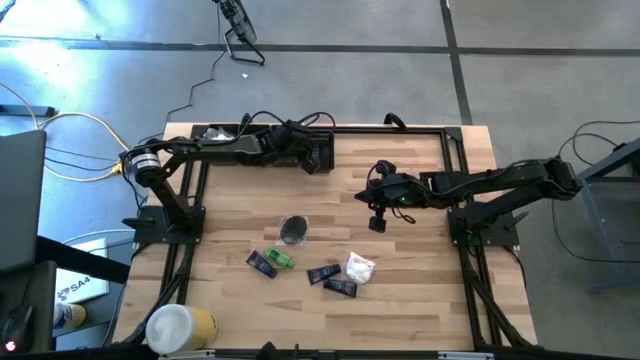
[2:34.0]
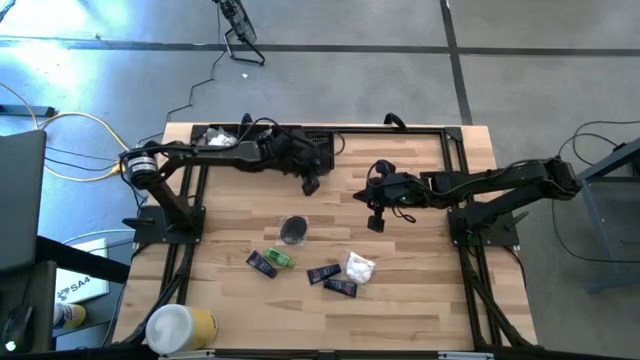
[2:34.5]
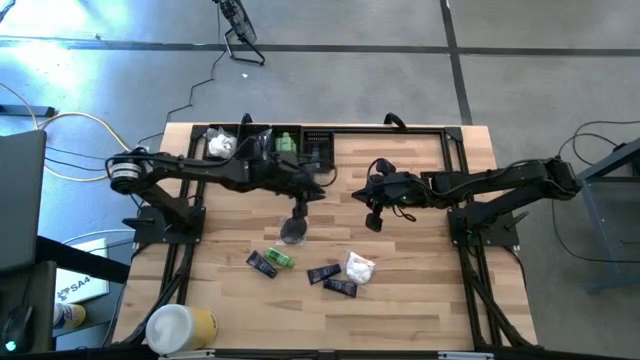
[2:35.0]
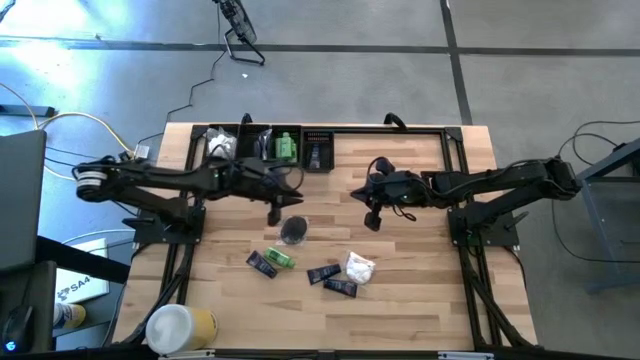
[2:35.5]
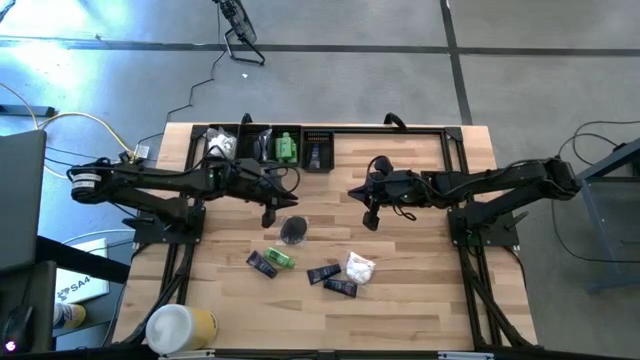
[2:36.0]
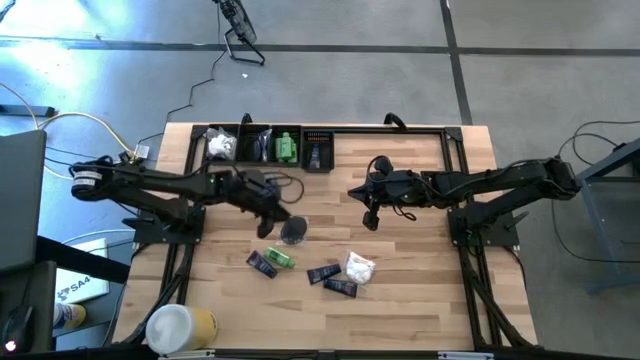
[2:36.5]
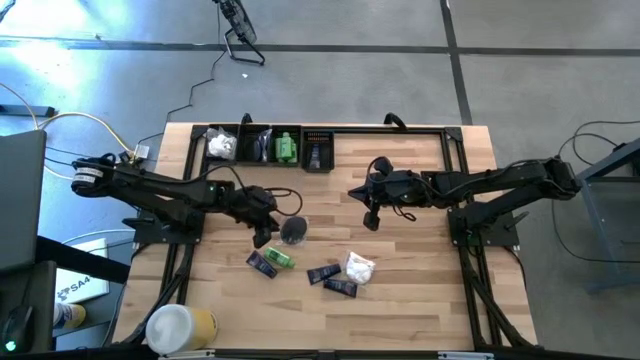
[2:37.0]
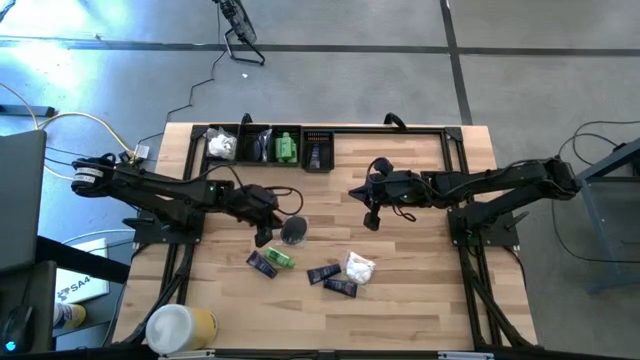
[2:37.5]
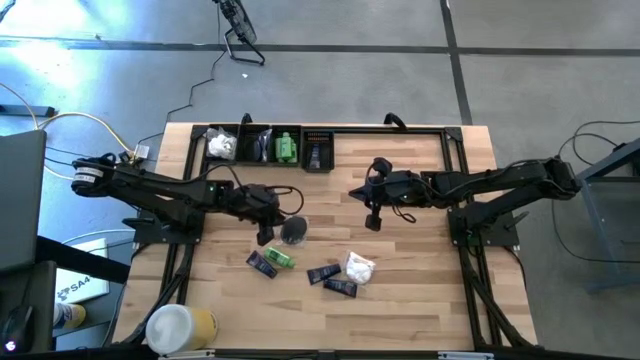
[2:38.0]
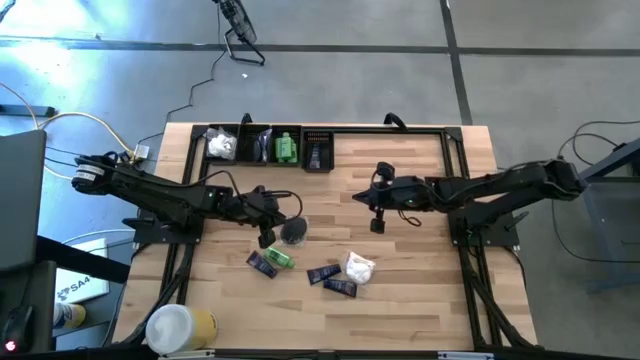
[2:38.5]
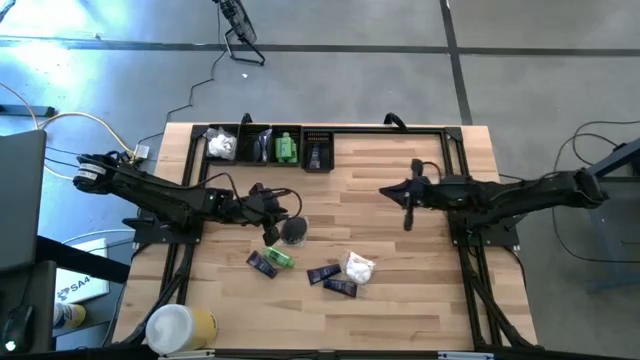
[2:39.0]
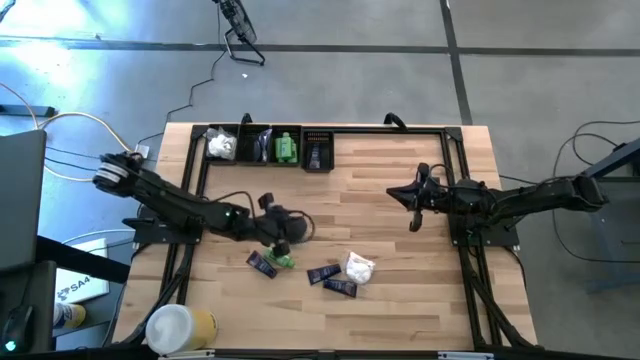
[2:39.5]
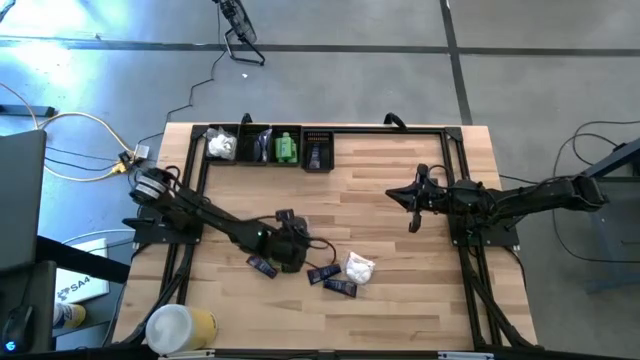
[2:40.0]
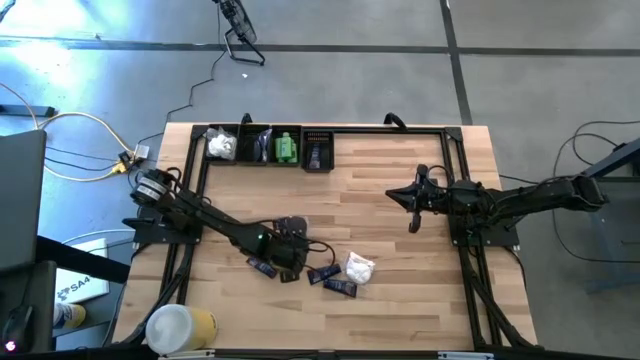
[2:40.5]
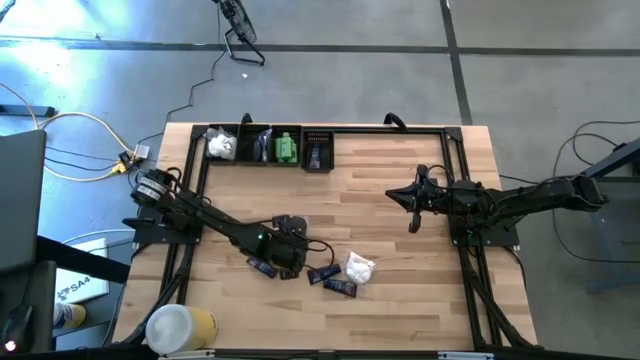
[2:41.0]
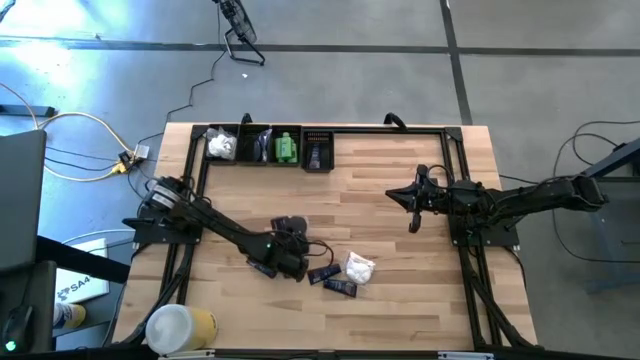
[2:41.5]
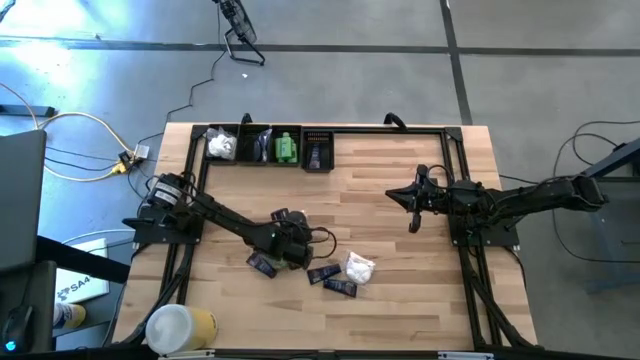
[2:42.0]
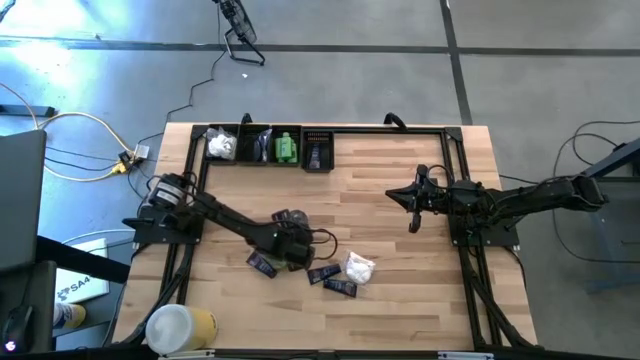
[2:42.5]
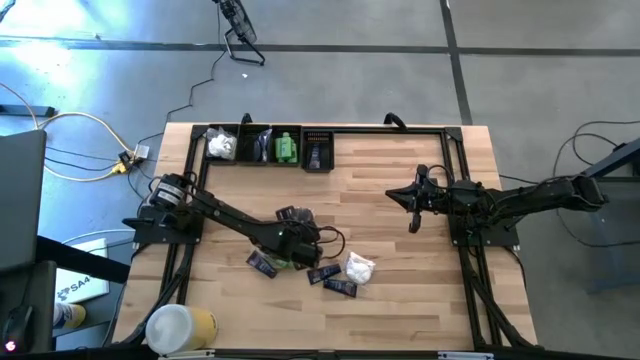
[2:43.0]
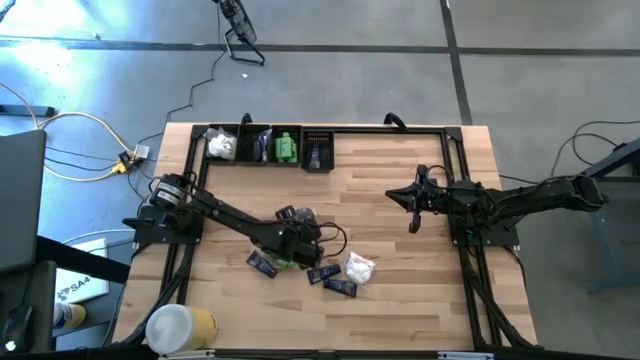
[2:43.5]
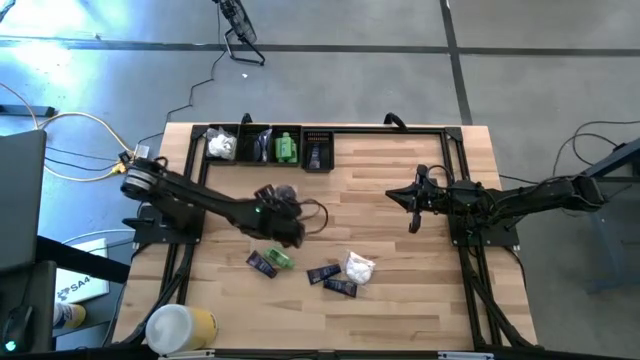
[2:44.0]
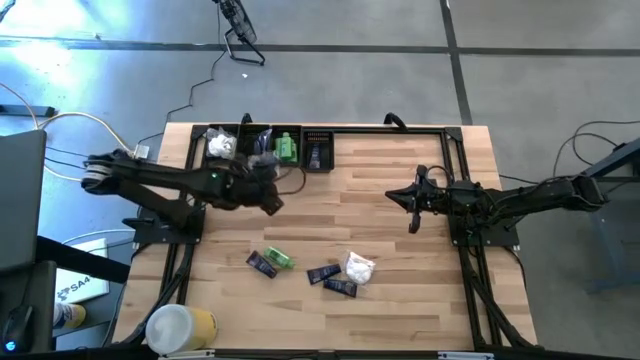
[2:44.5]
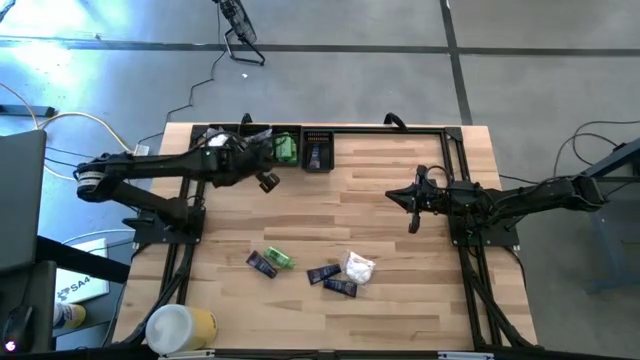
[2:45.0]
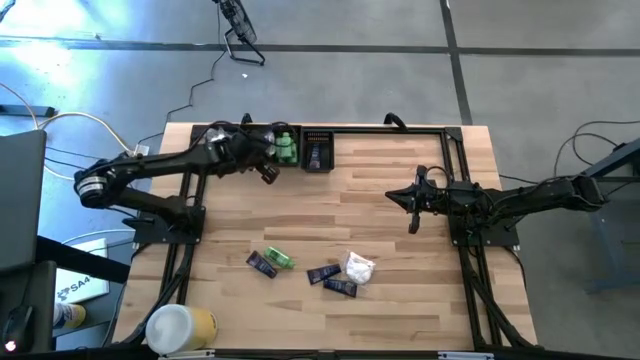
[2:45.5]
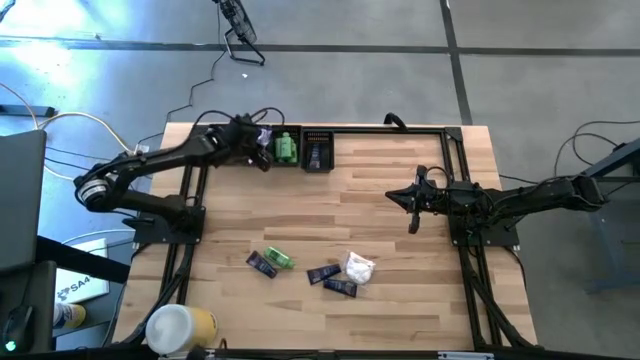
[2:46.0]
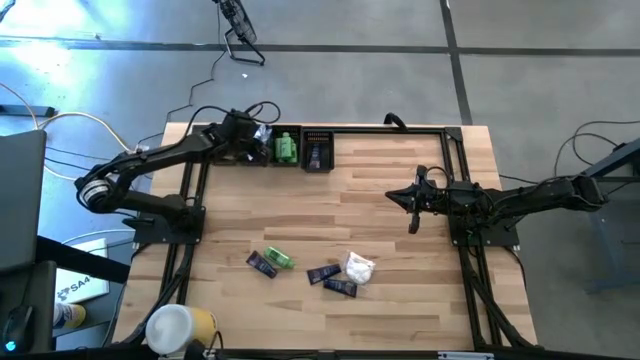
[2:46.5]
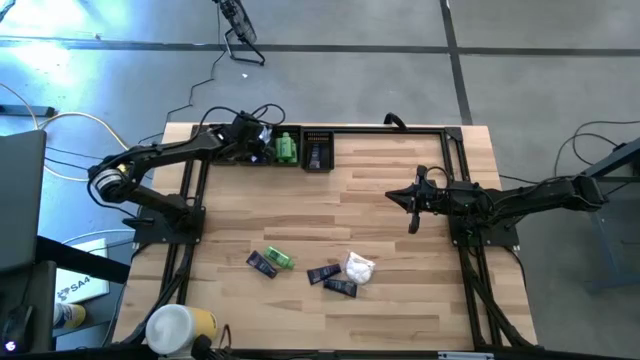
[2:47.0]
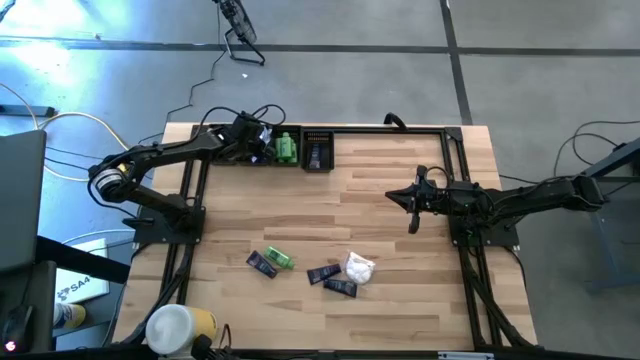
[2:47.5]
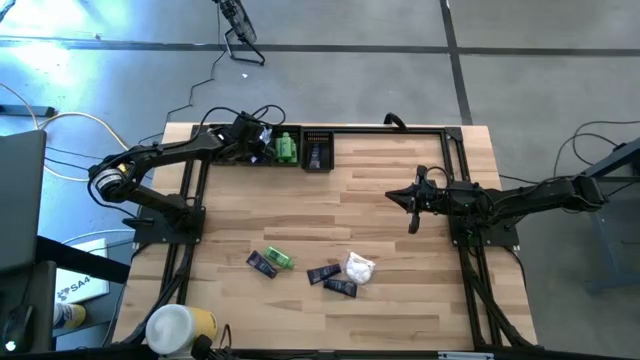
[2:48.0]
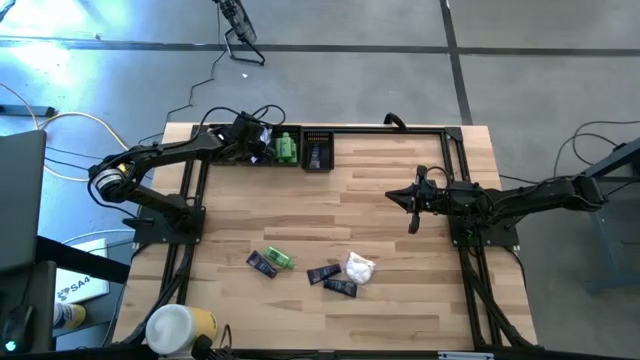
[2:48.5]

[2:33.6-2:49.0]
Task: Pick & Place Travel size toiletries
Put the hairbrush into the middle left black bin

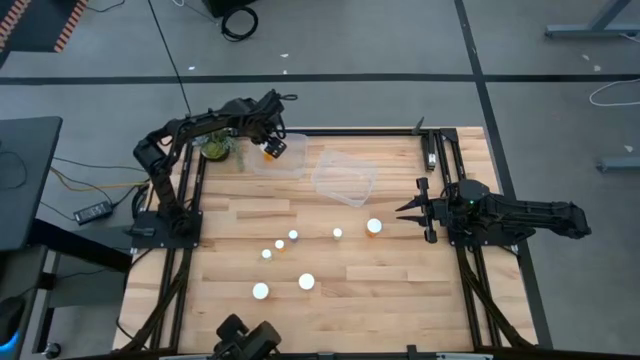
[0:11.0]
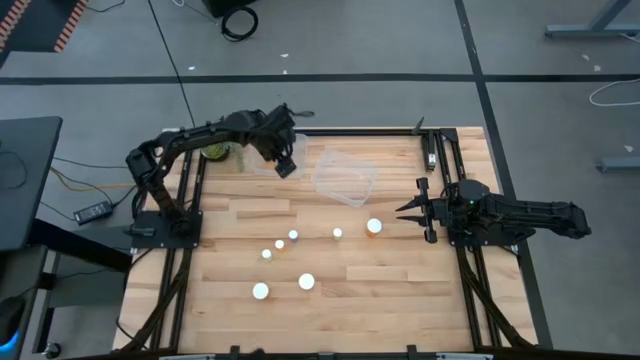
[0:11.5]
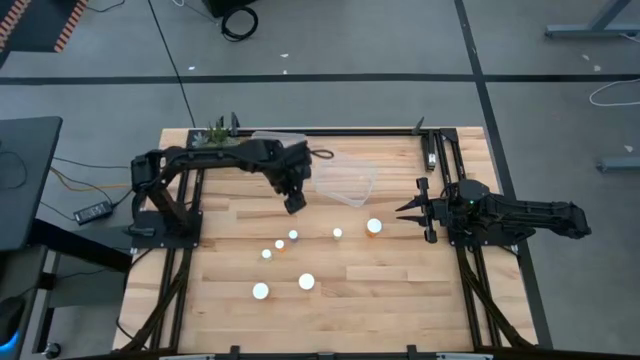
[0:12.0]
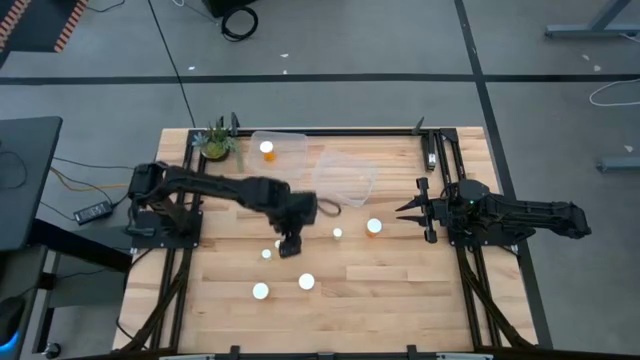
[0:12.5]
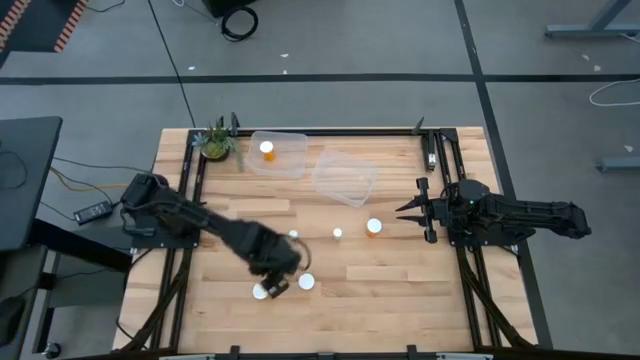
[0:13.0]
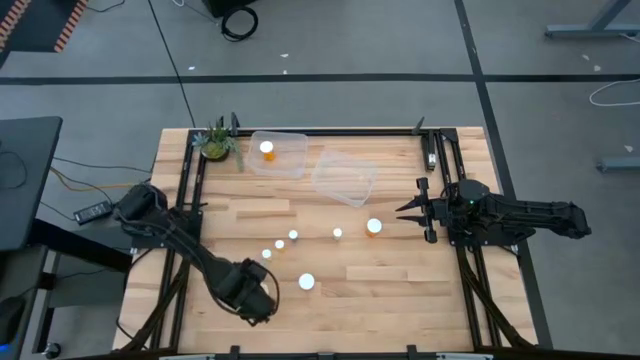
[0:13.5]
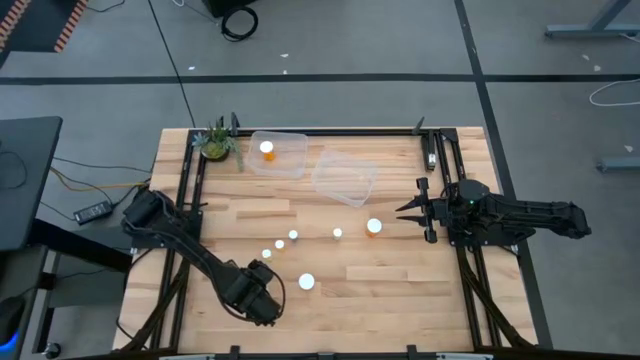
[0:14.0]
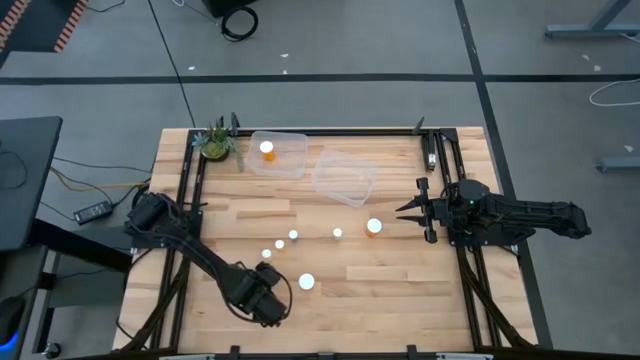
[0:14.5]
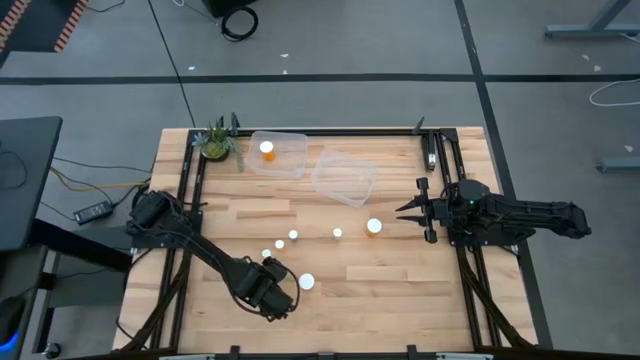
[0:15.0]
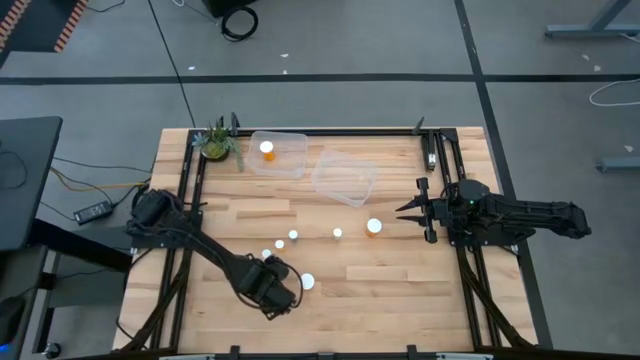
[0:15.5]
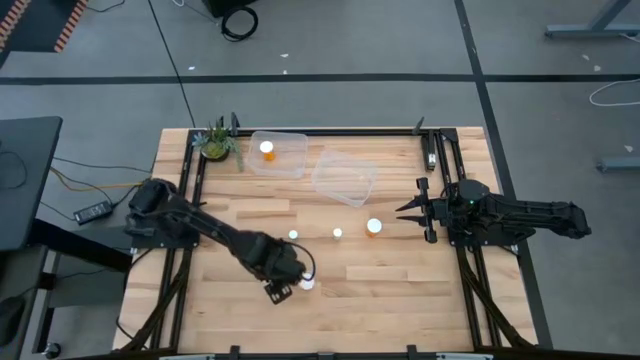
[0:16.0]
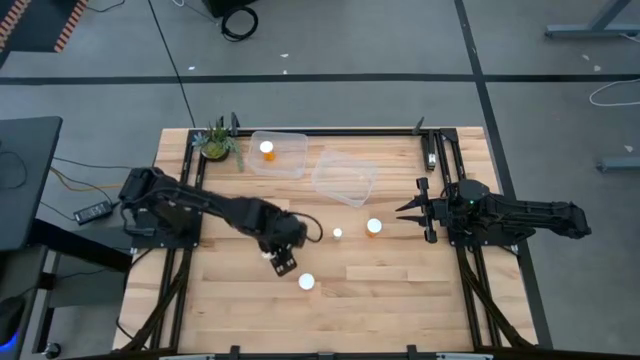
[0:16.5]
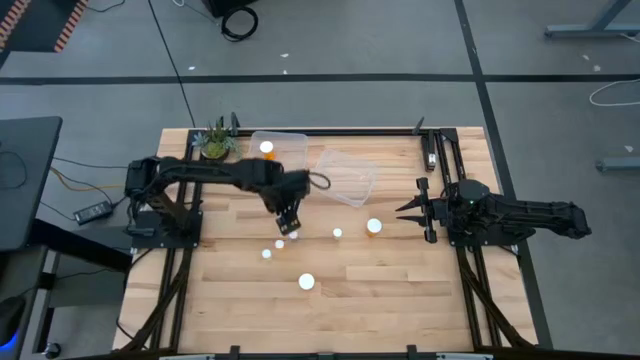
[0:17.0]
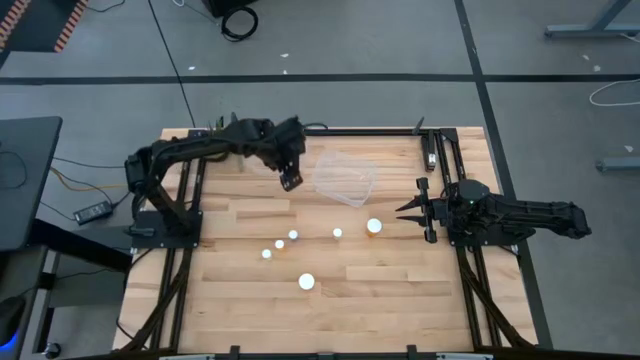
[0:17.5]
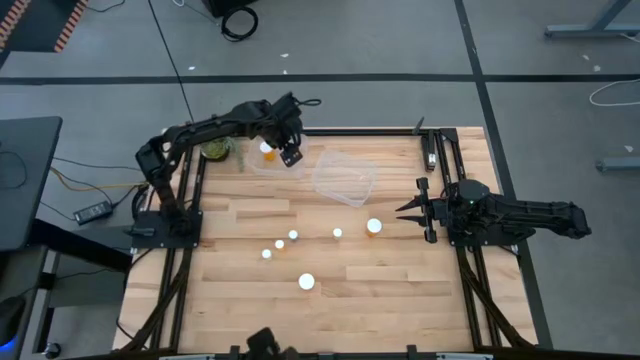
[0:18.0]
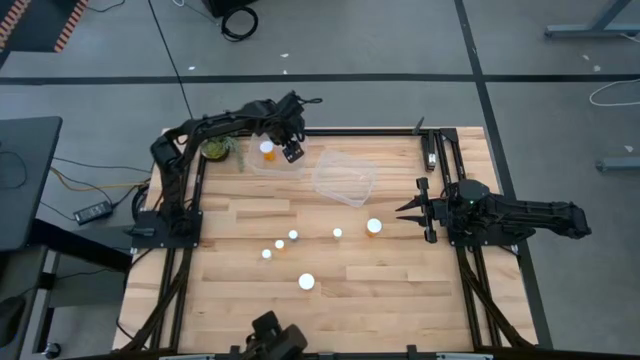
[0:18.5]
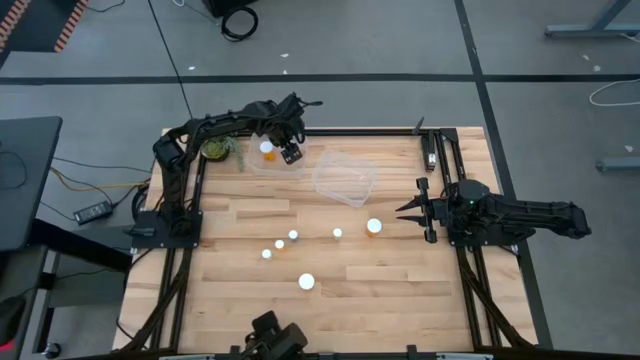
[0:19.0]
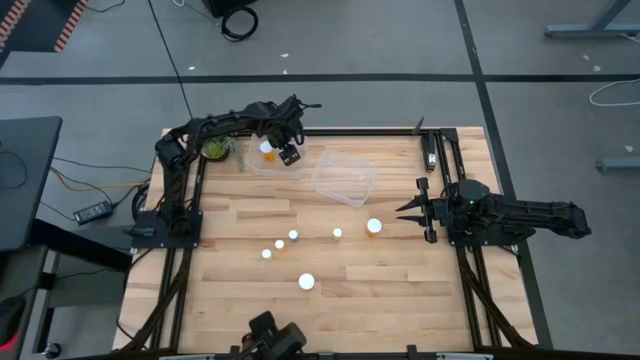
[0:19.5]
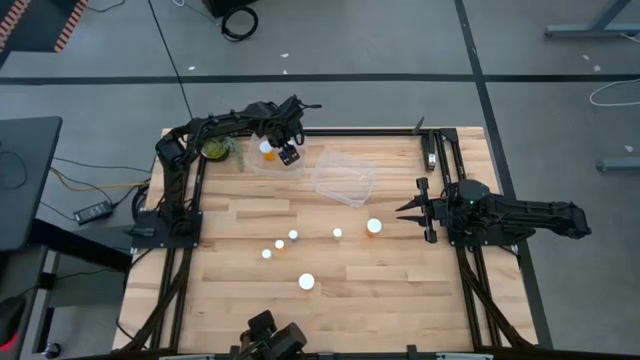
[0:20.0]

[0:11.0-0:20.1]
Task: Pick and place medicine bottles into bin by pill shape (circle, oval)
Put the bottom left big orange pill bottle into the left transparent bin
